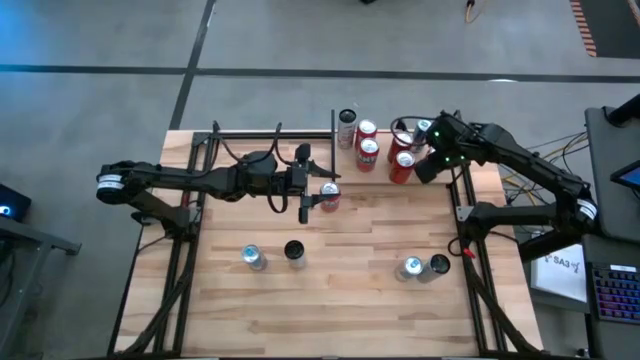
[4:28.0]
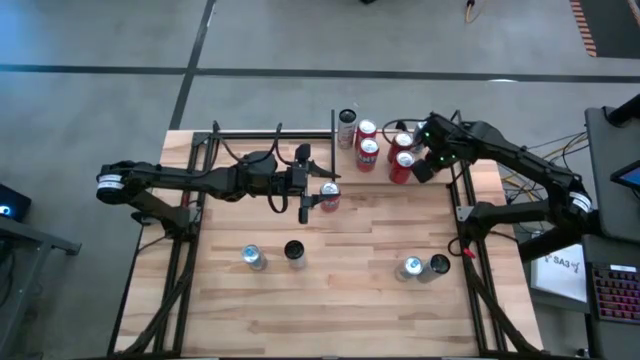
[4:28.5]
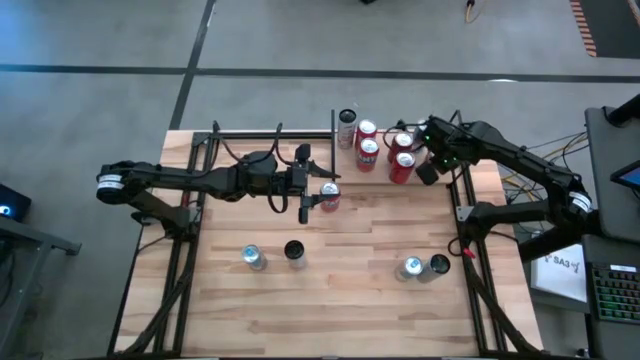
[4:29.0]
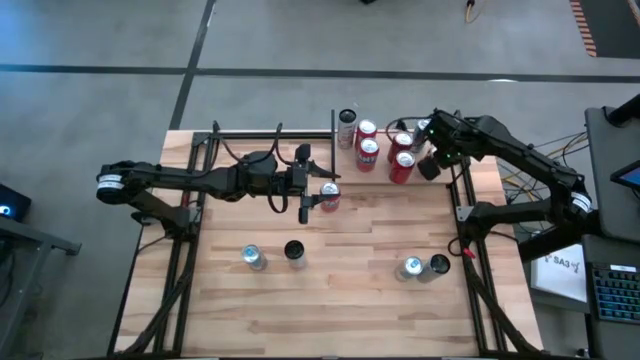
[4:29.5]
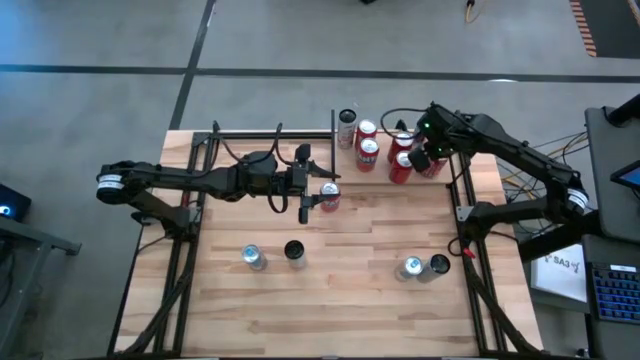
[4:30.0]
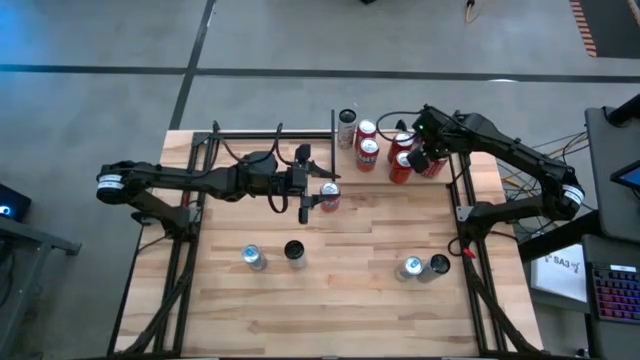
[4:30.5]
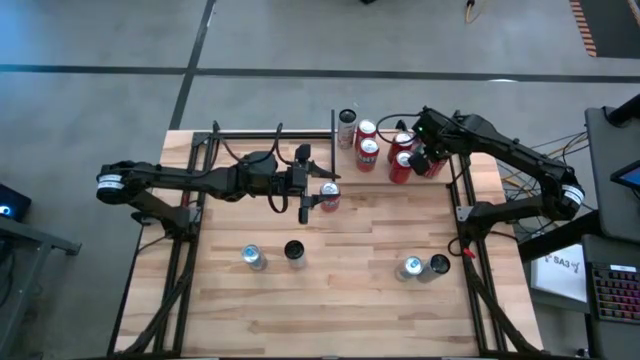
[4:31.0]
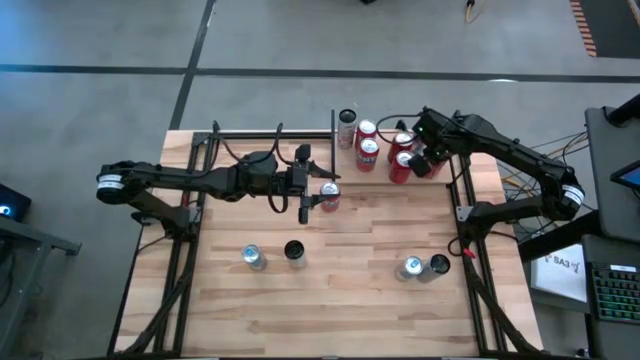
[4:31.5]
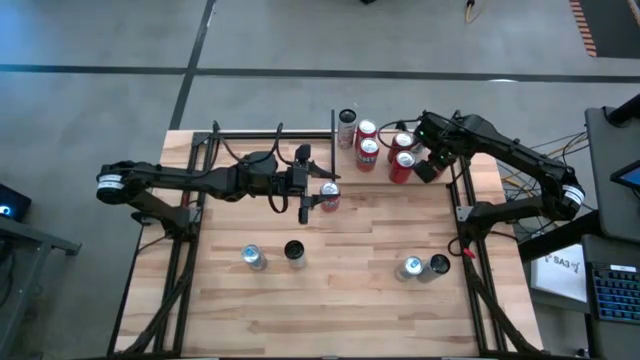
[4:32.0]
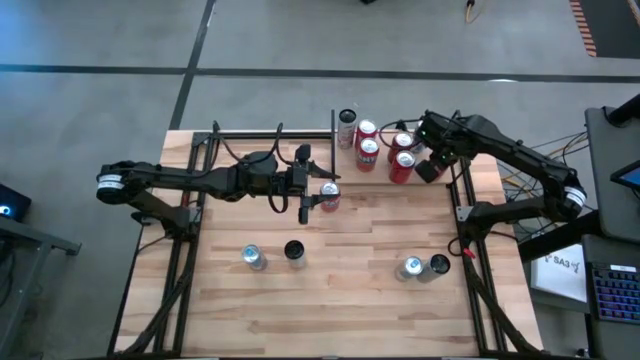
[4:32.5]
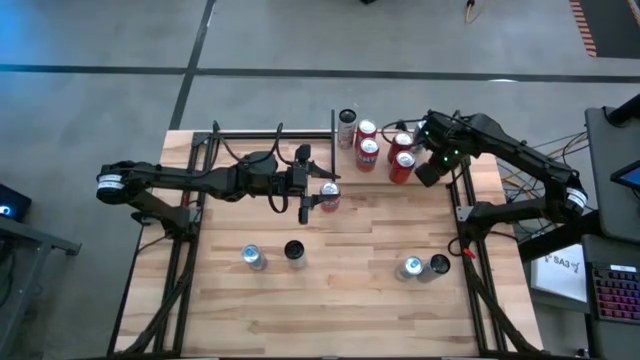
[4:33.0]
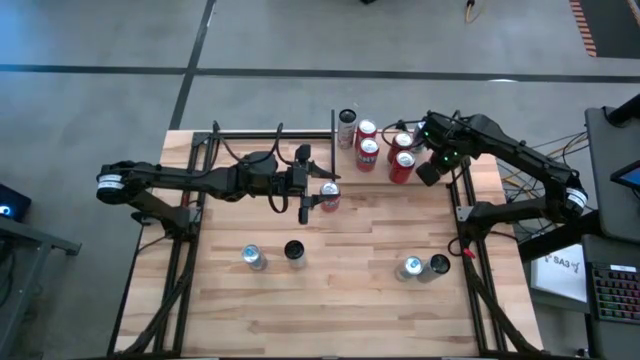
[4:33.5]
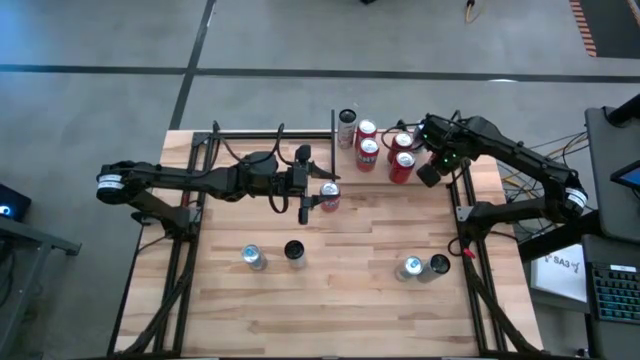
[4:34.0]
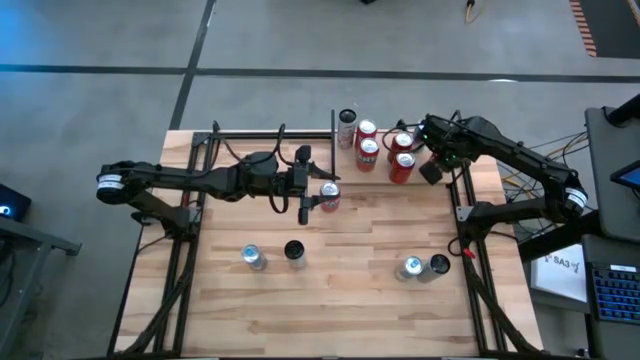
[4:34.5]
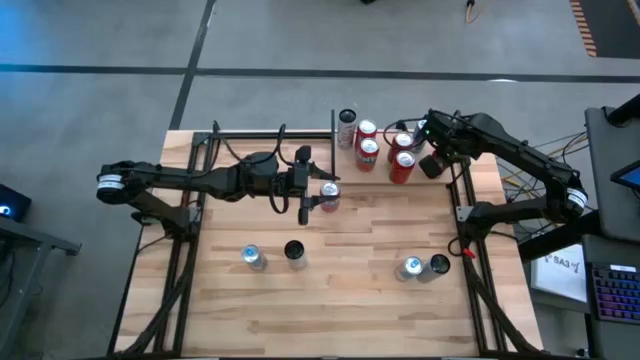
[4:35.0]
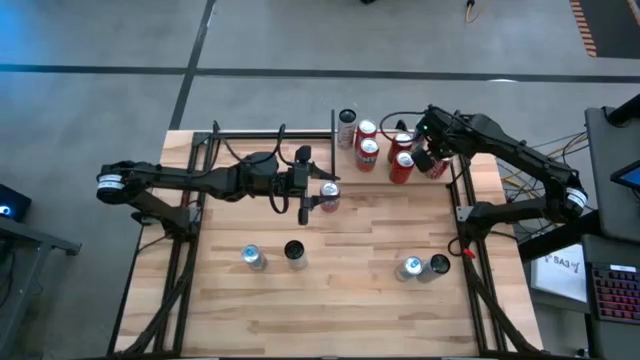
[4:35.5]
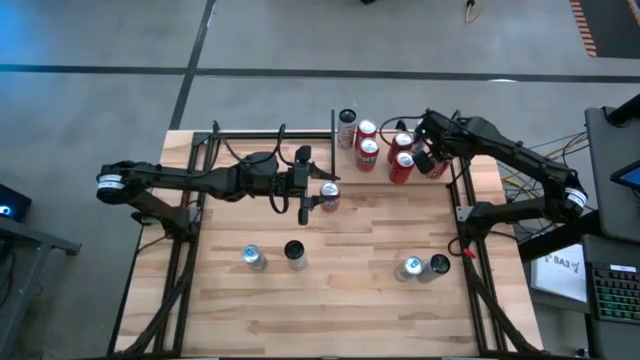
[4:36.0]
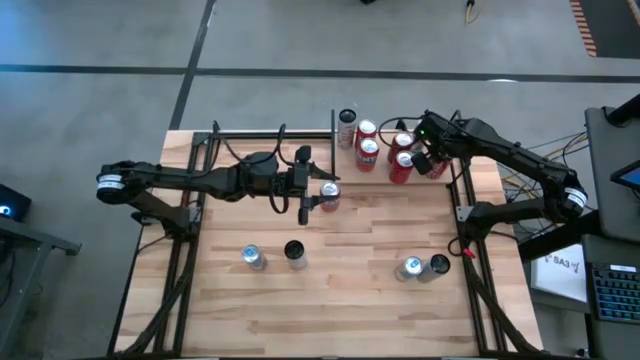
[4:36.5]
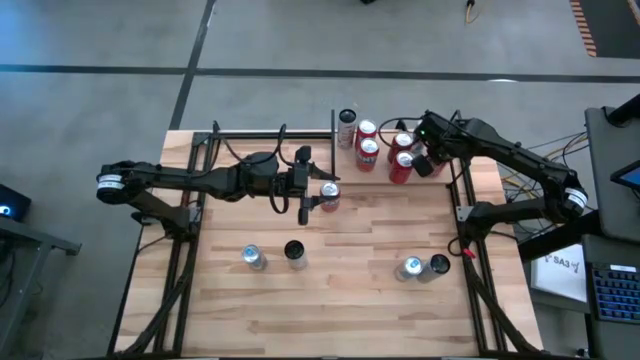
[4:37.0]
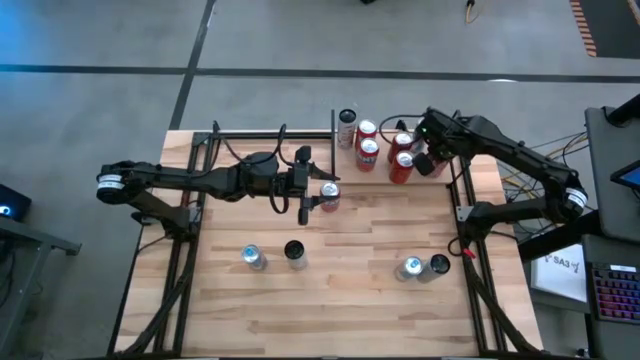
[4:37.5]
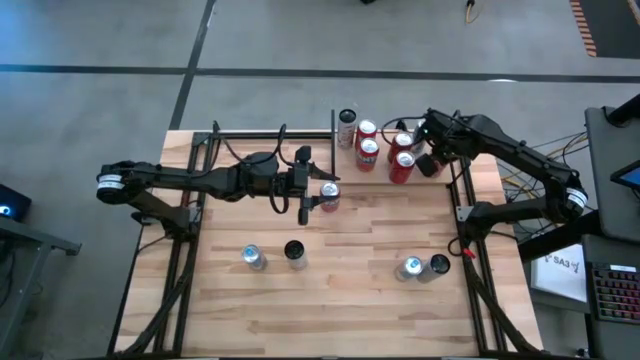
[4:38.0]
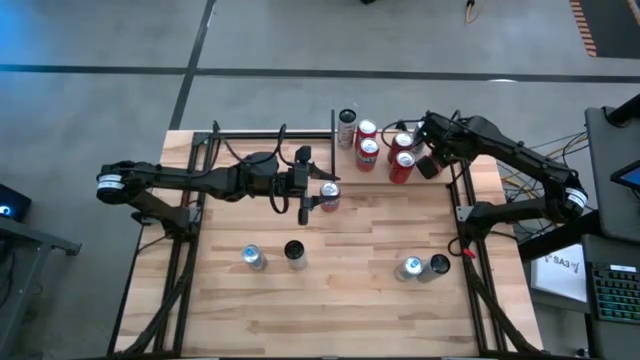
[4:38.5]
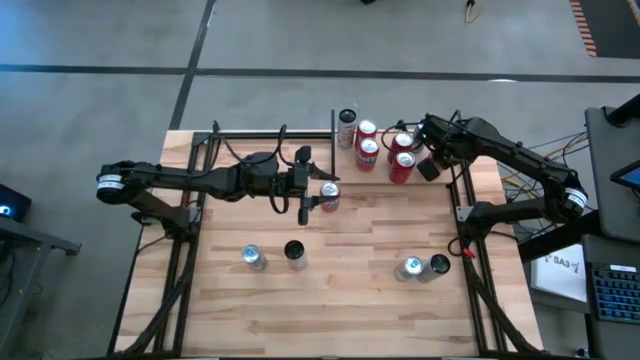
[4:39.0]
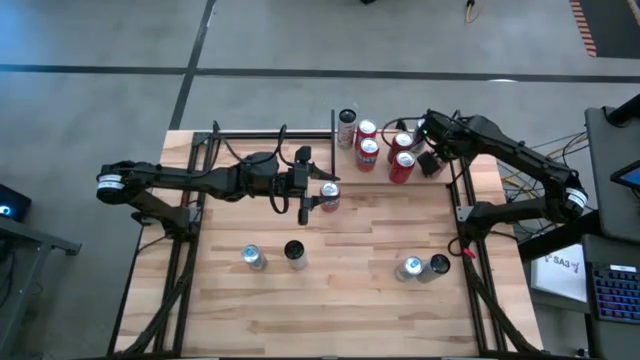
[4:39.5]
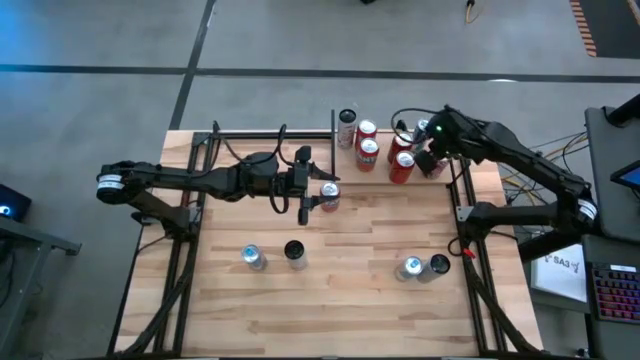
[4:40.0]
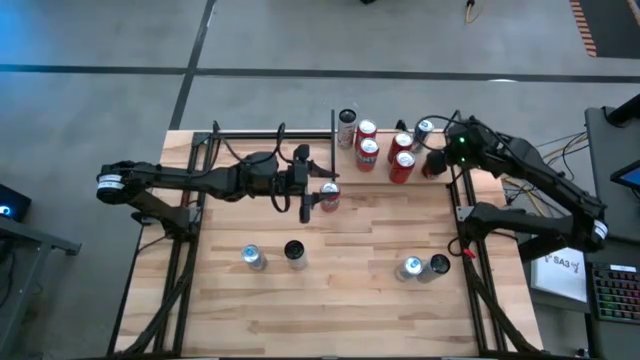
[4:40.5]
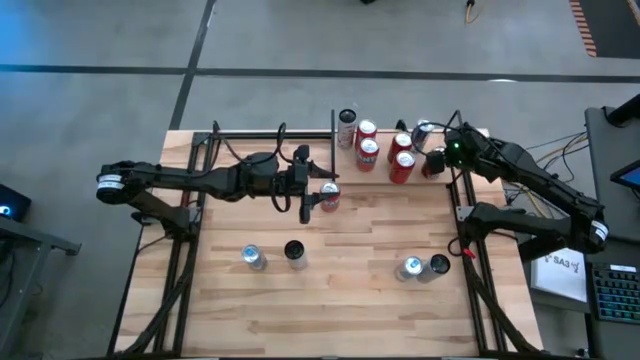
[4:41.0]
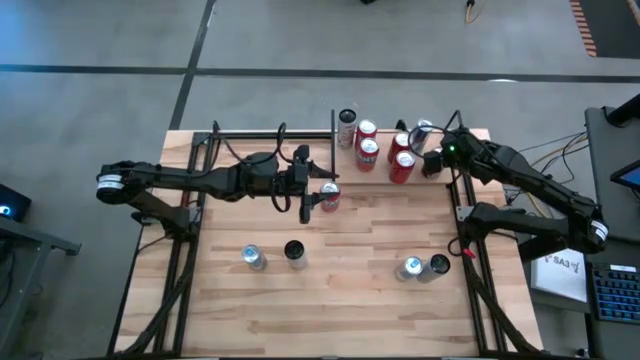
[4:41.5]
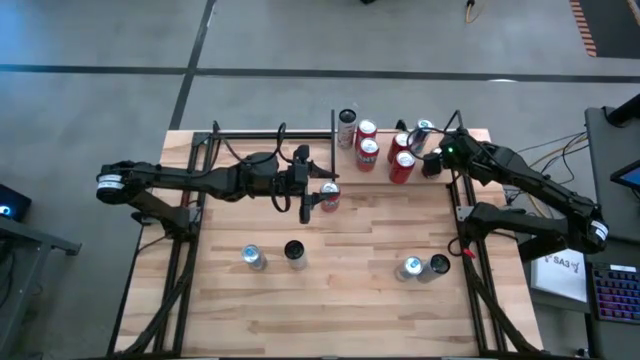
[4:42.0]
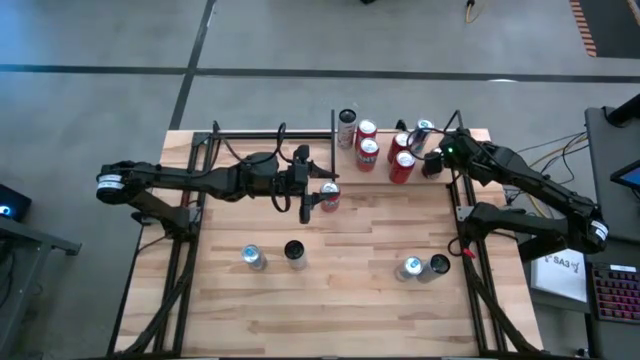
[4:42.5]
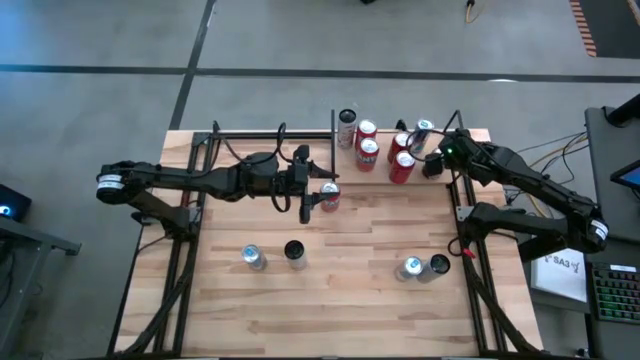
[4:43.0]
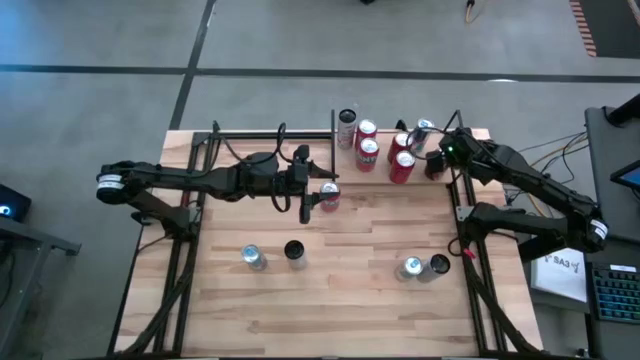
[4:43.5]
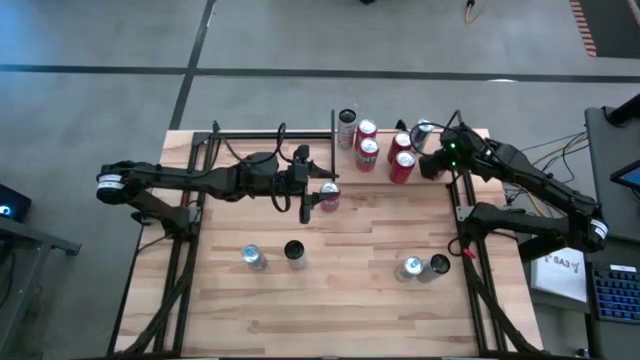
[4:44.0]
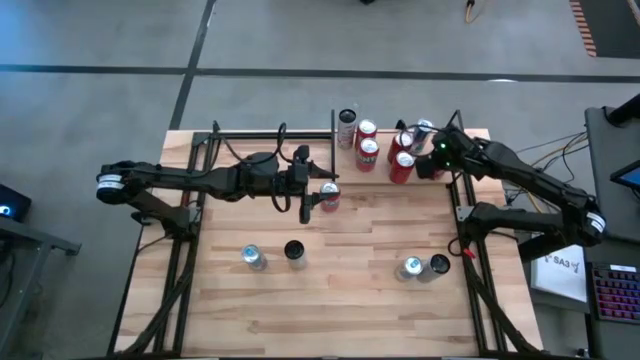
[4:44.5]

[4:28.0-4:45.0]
Task: Place canned beverage on shelf
Put the red white soda can on the shelf

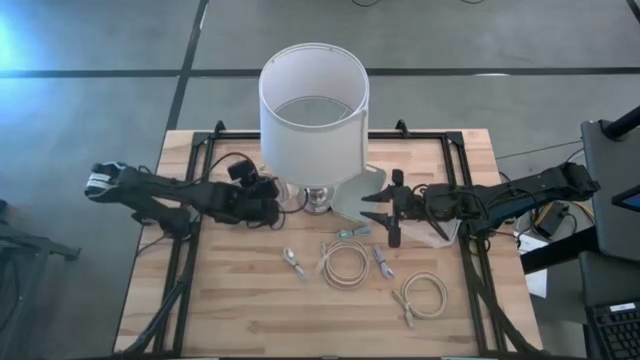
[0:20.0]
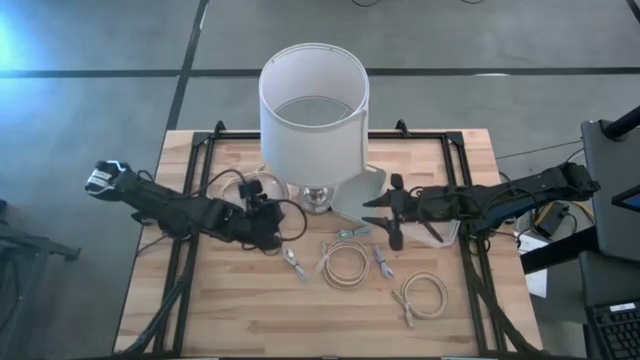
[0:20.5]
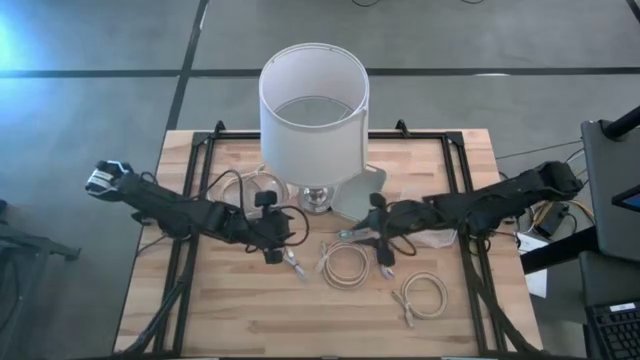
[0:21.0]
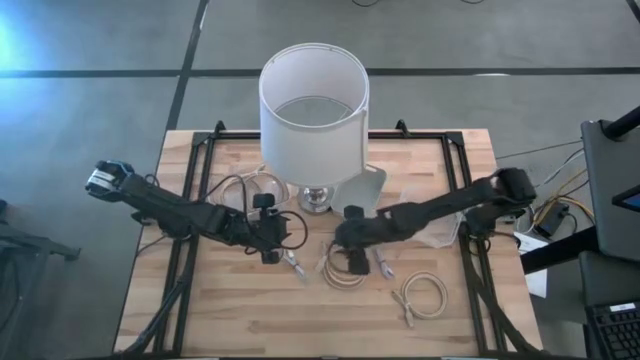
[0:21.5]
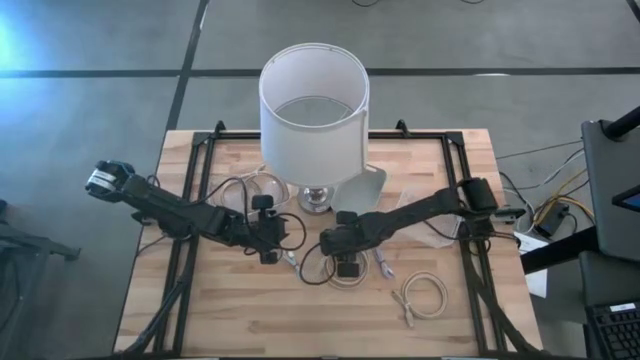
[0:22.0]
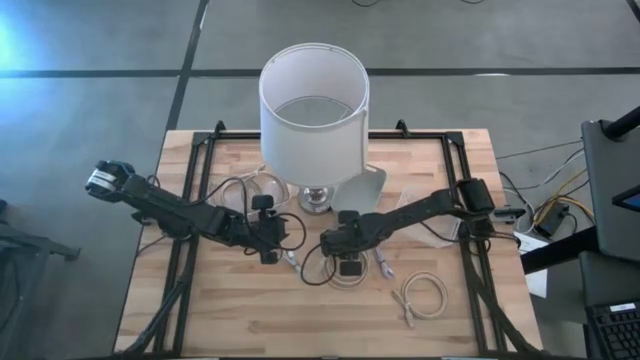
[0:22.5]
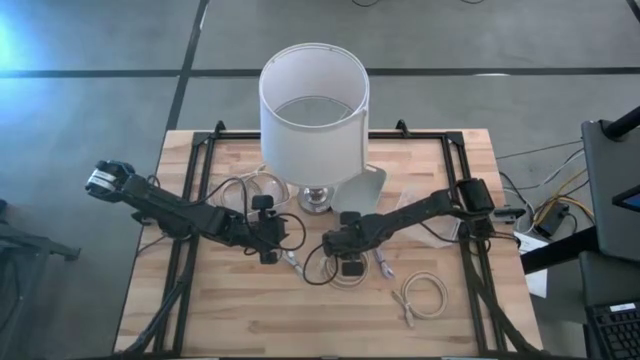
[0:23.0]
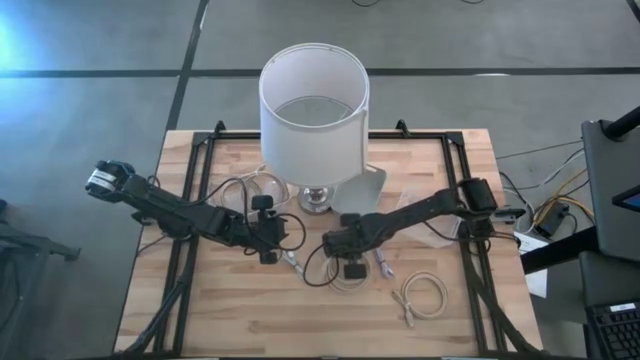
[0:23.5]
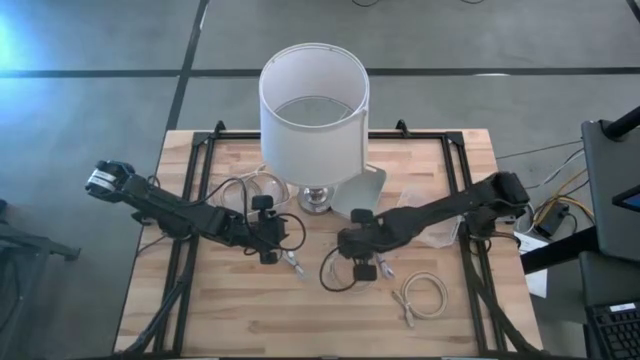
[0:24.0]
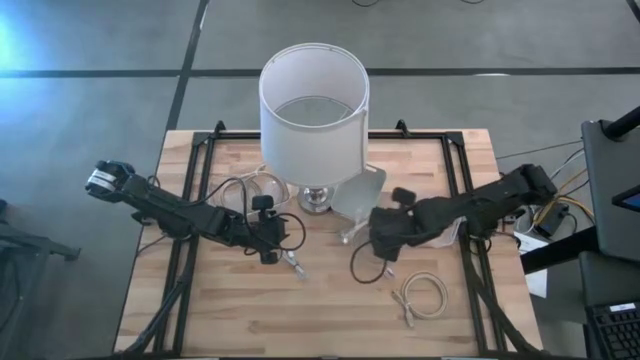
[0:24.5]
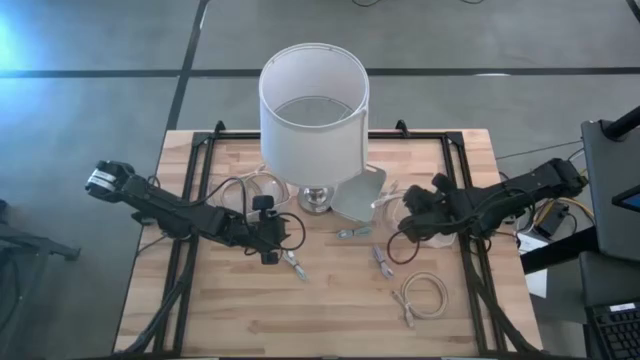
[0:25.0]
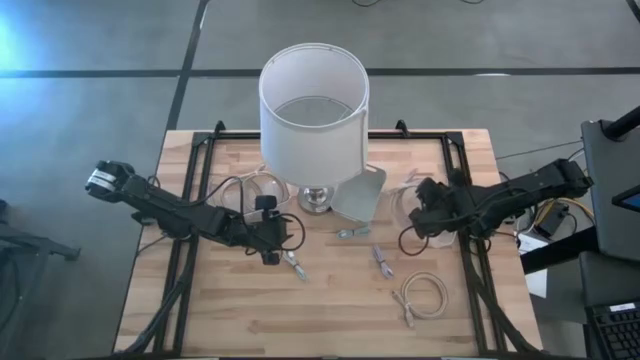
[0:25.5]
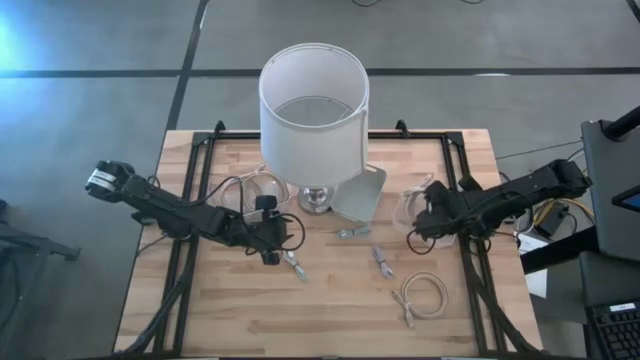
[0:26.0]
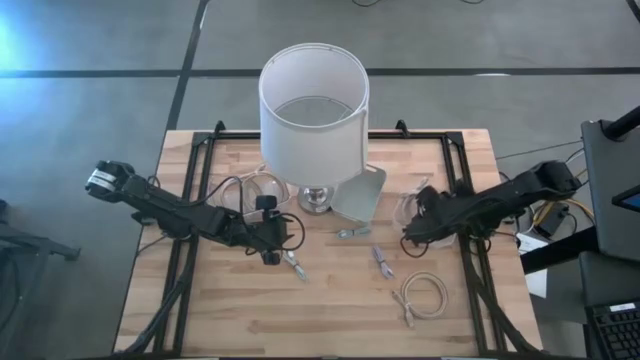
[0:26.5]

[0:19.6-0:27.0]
Task: Pick & Place USB Port
Put the light brown HDMI cable into the right transparent bin
